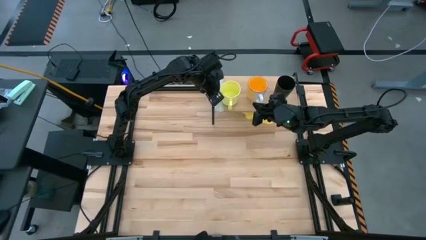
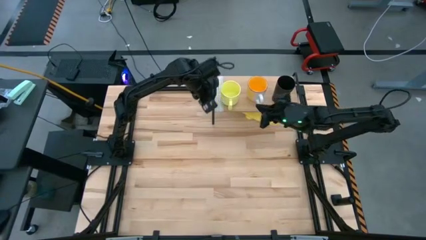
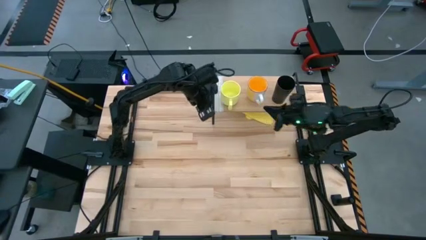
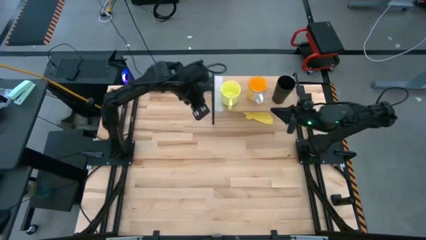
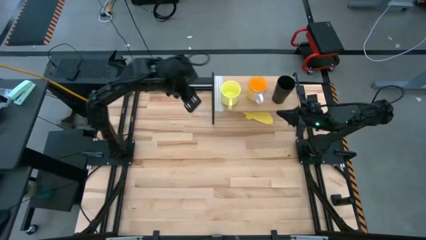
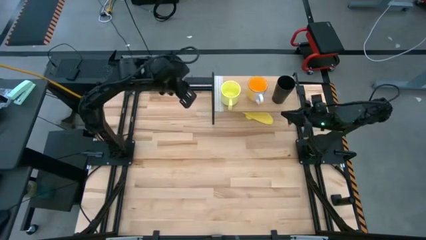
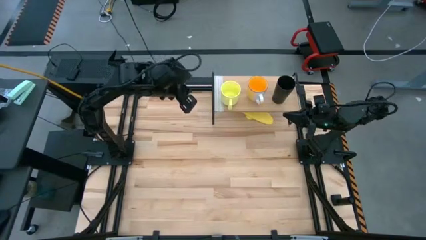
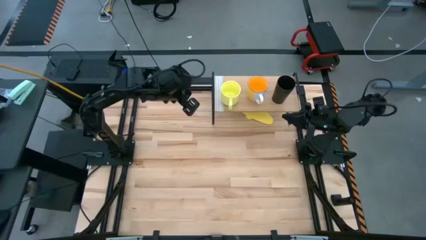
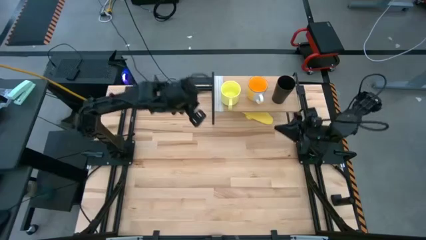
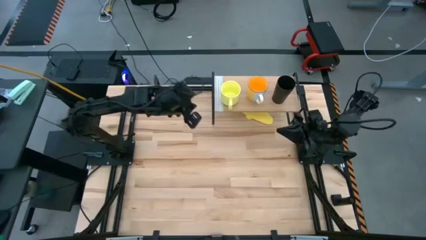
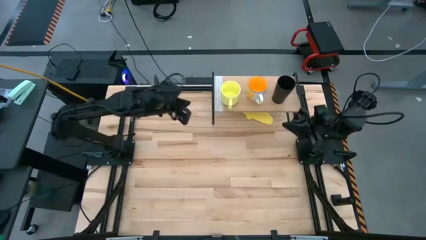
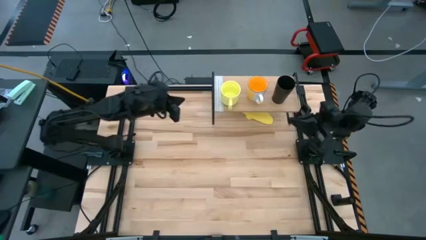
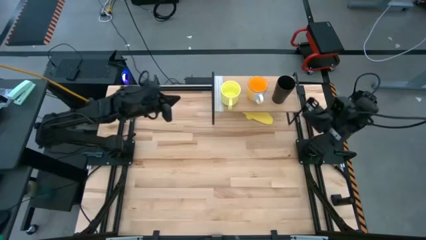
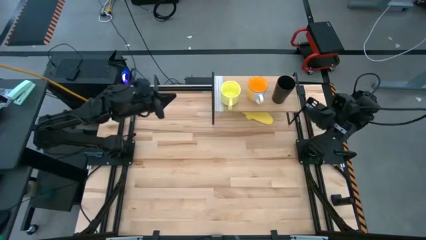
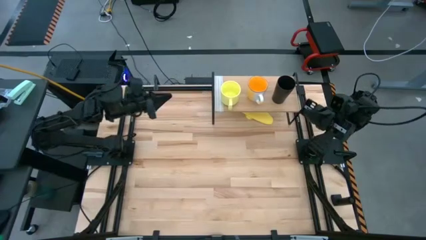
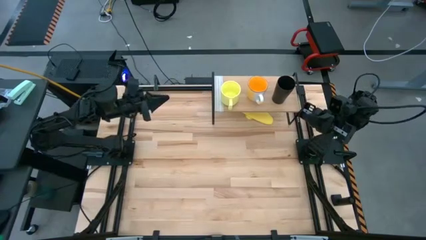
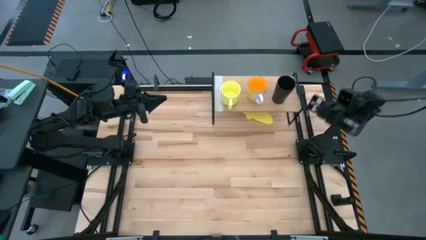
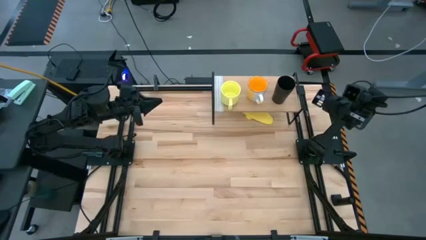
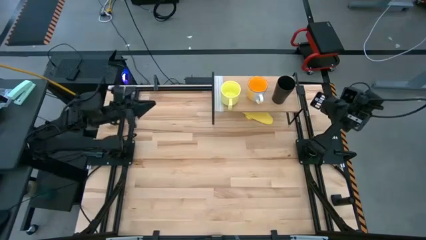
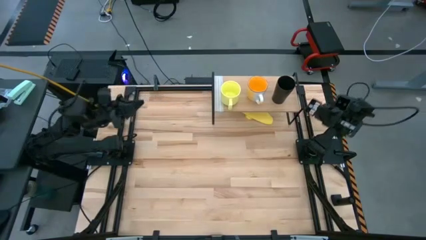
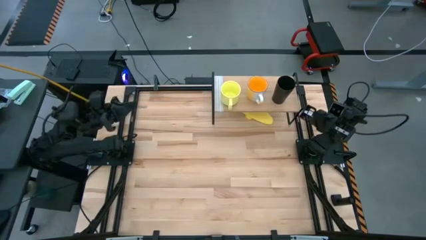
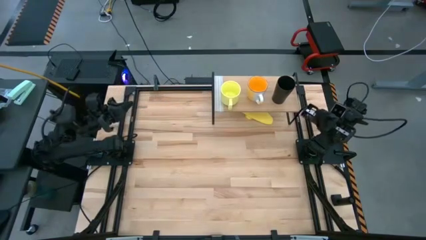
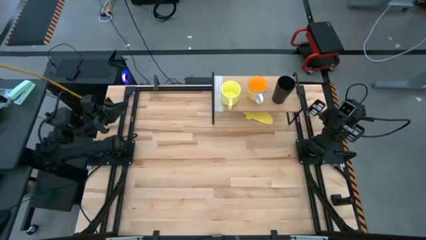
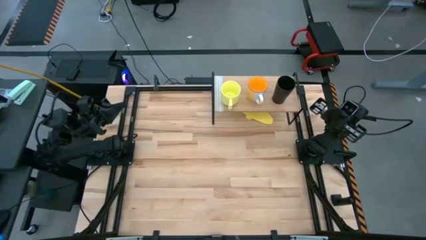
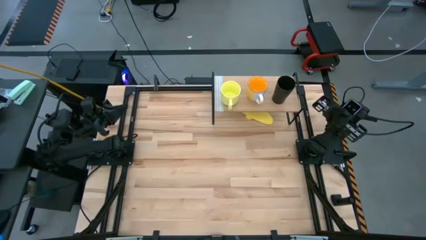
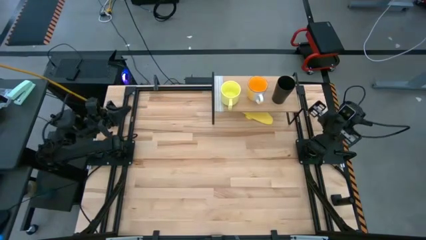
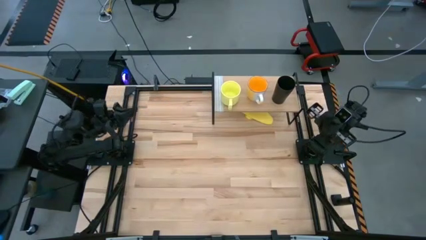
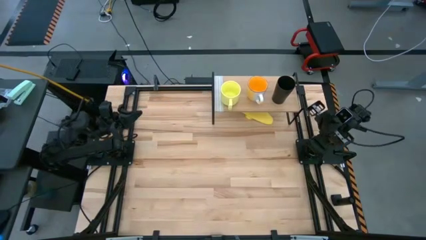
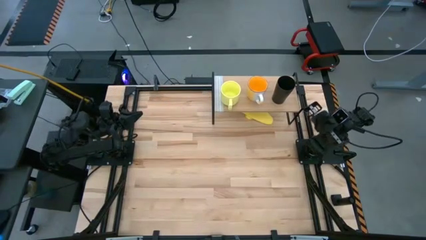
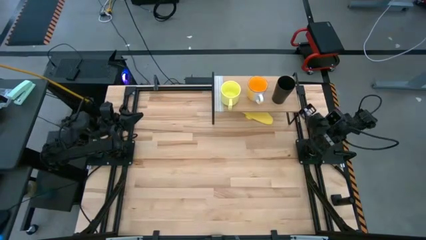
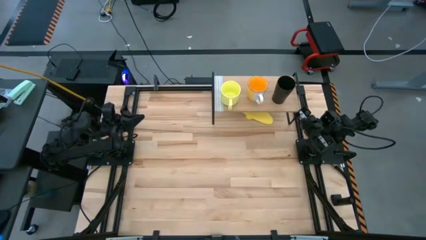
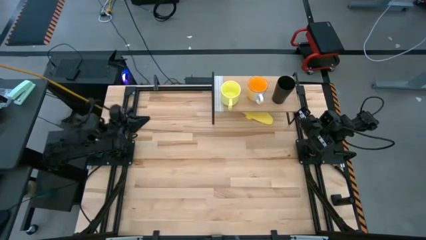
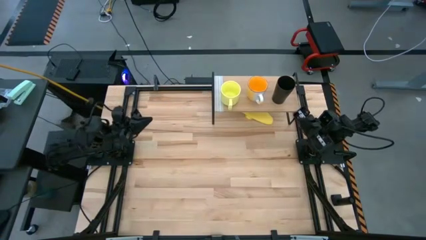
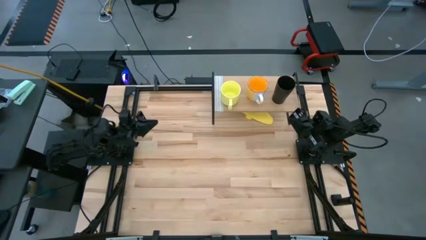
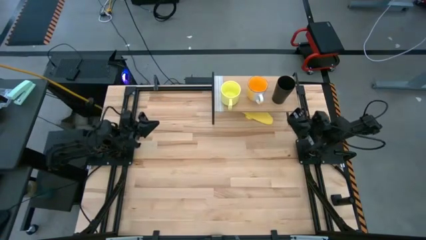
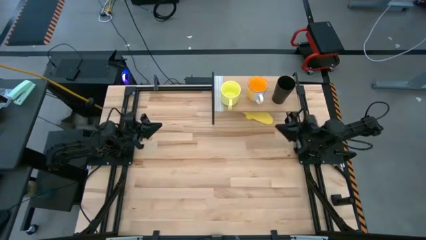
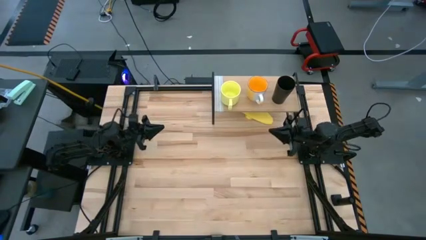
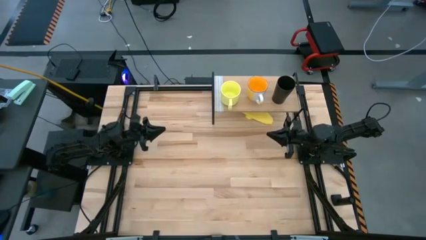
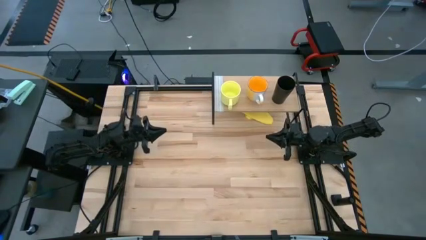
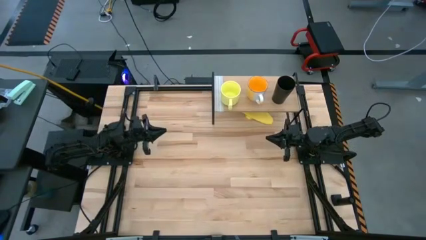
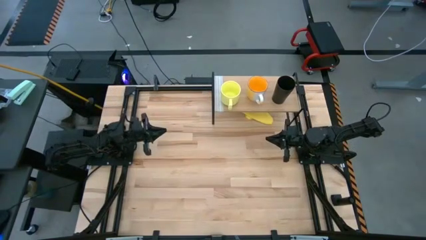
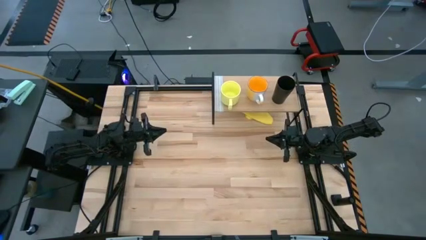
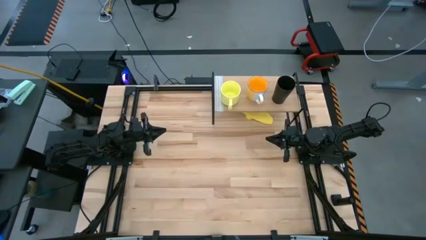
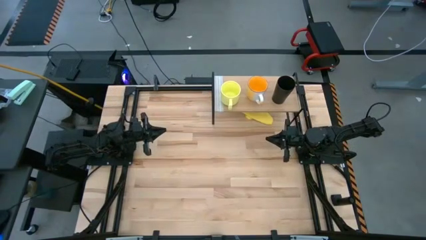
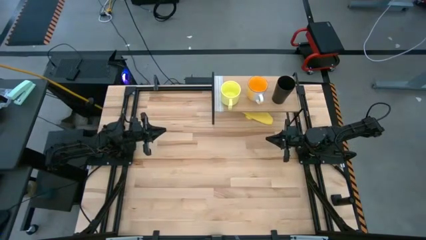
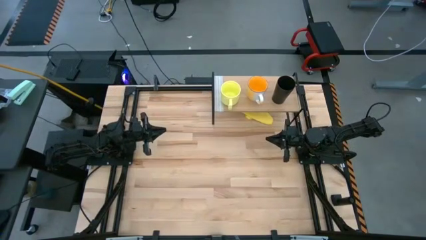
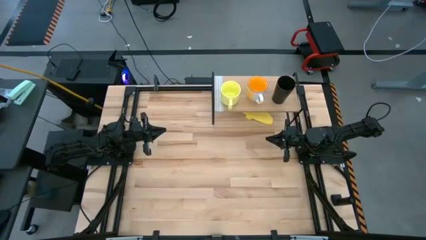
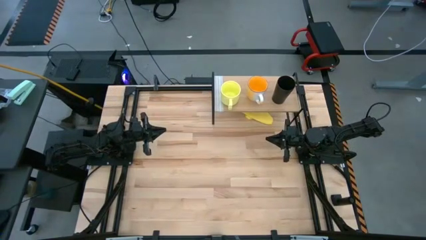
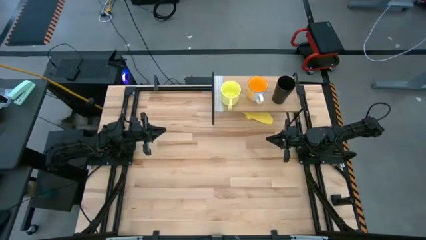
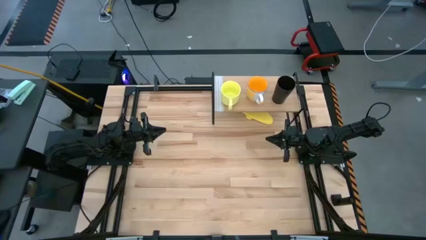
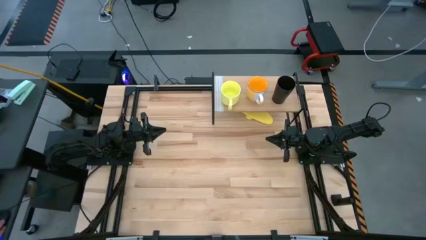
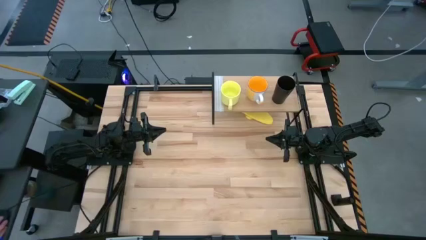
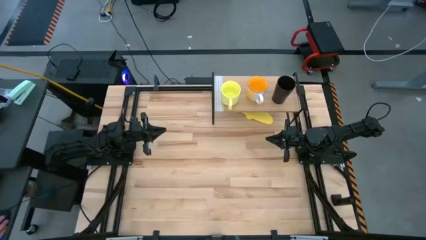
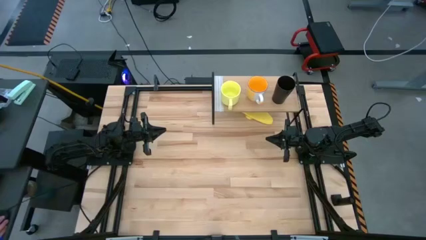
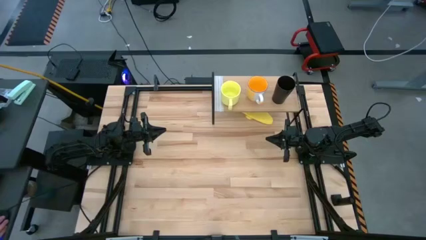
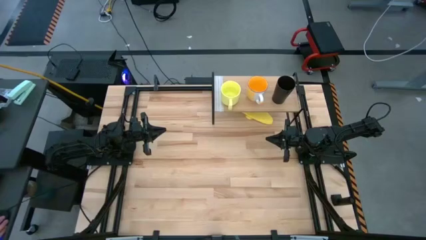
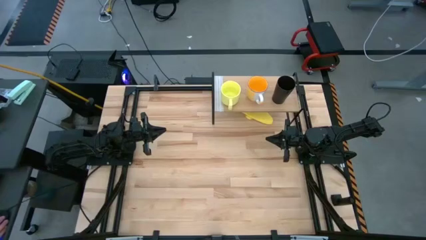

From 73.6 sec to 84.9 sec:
Task: Stack small to large cups/mugs on shelf
Return to Home Position

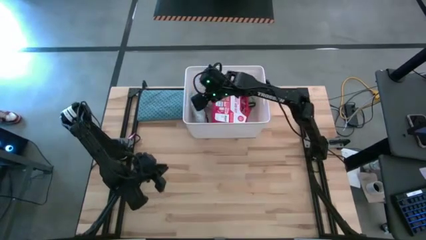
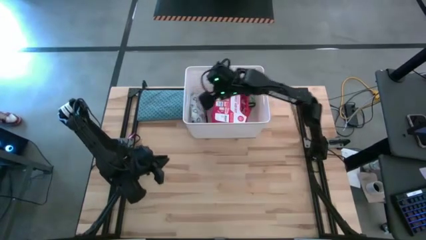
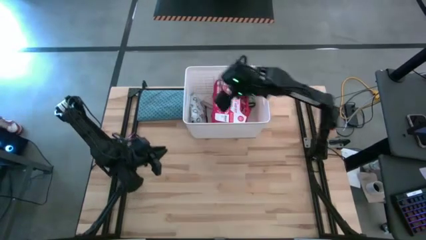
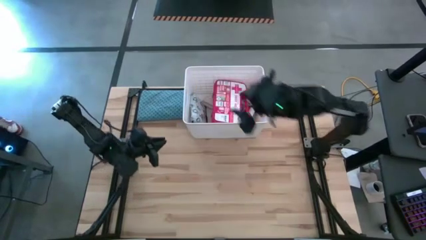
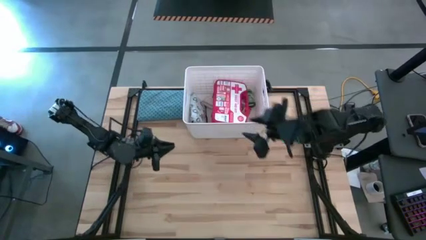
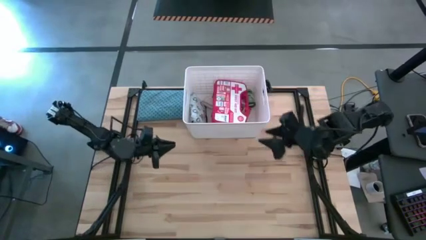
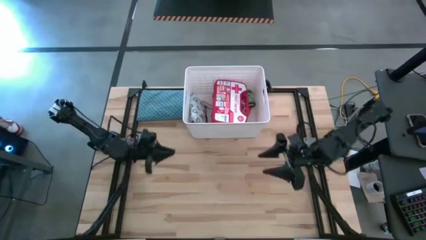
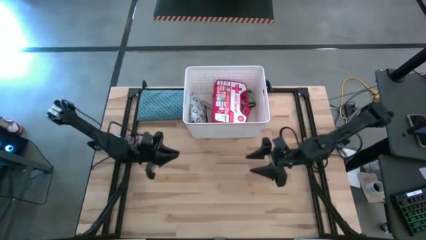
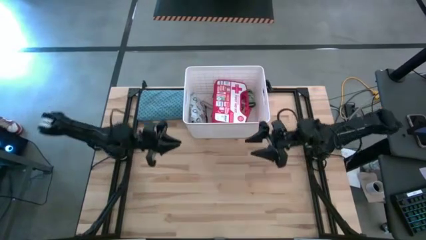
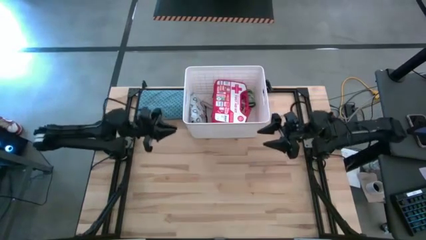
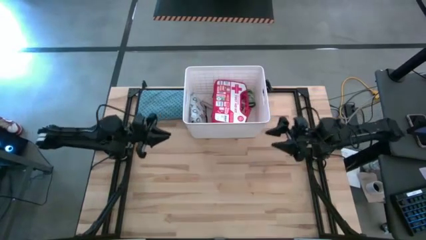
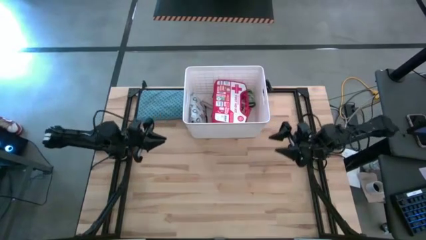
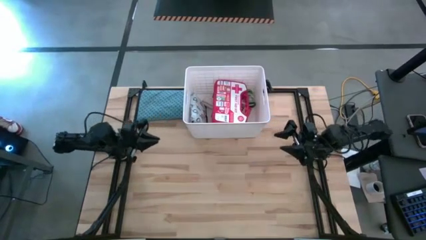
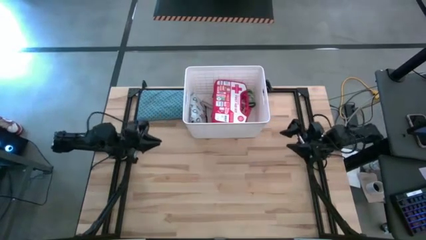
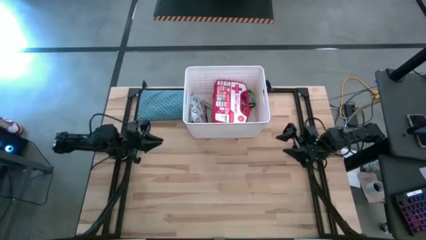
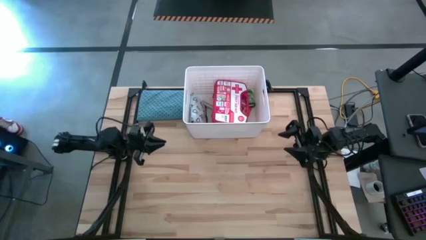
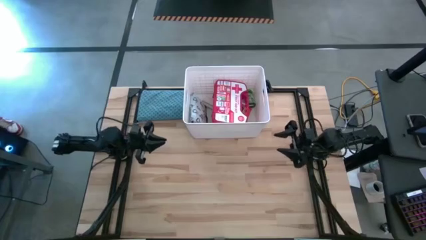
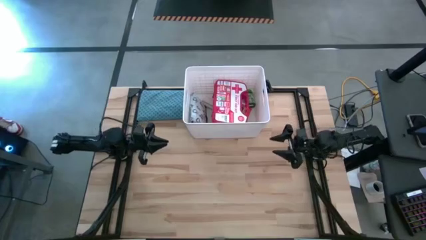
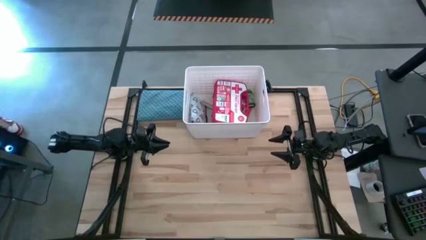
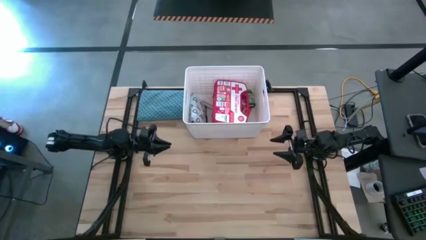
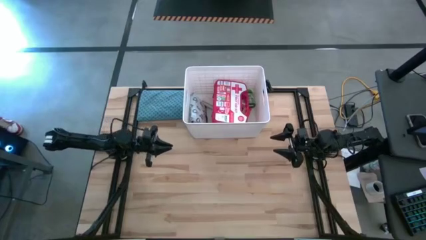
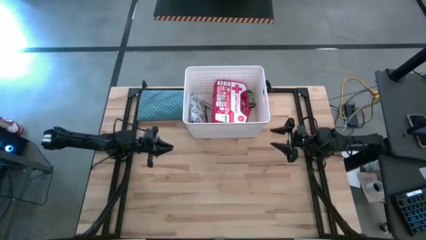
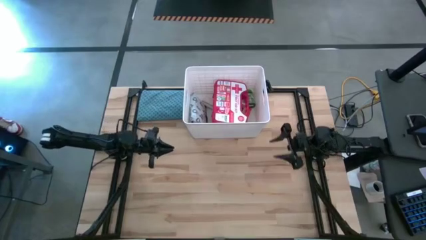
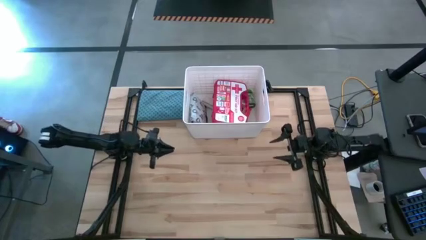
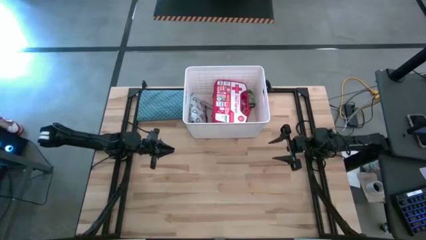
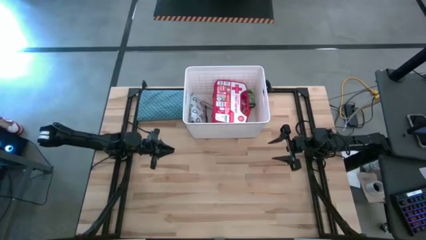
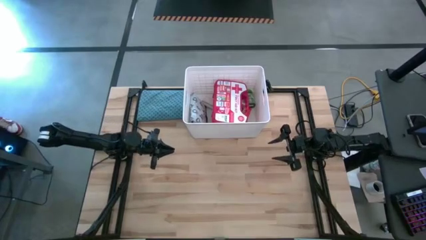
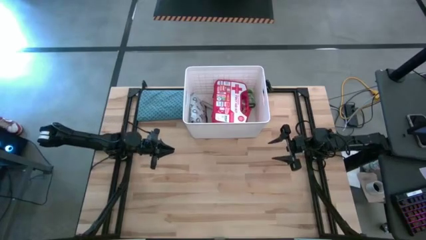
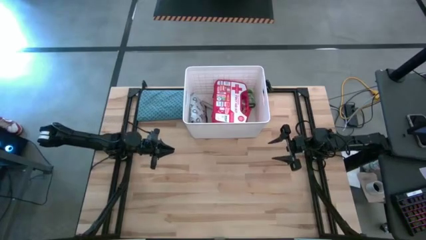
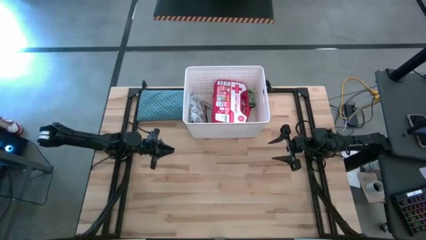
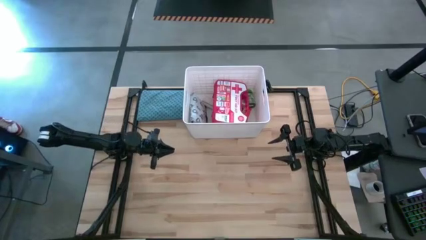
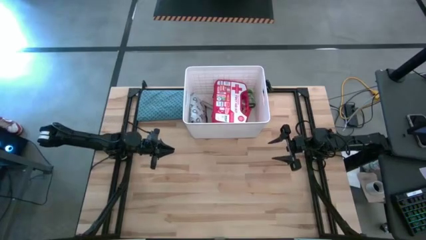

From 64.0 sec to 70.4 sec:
Task: Pick & place medical supplies in basket/bin
Return to Home Position
